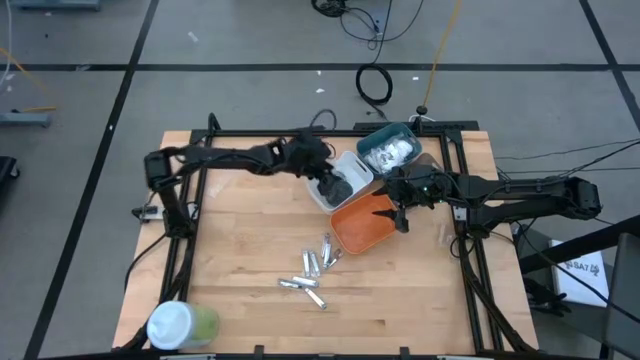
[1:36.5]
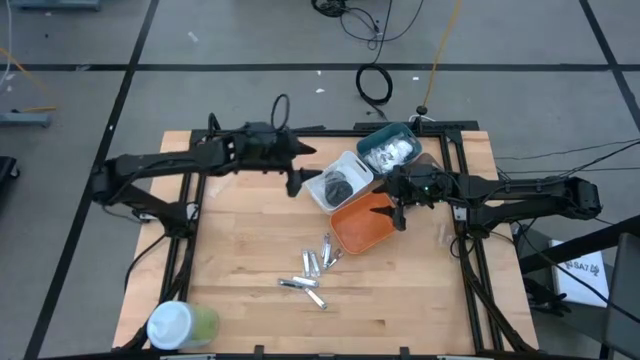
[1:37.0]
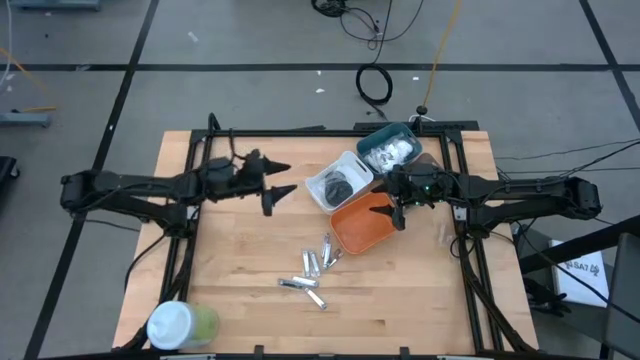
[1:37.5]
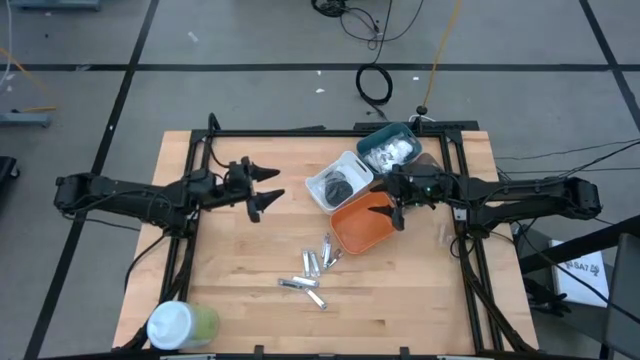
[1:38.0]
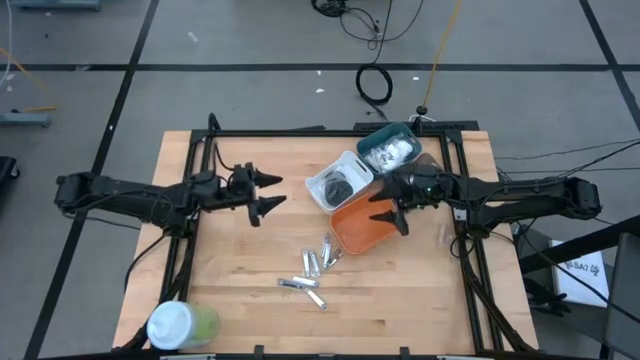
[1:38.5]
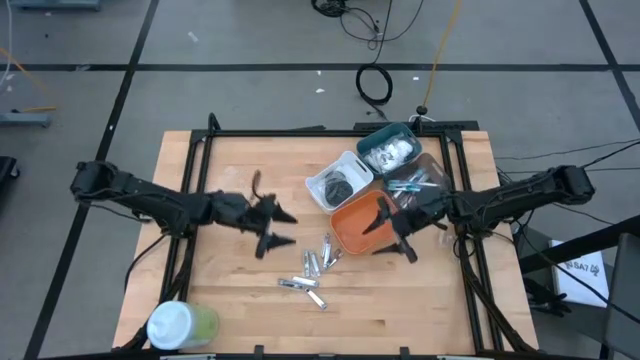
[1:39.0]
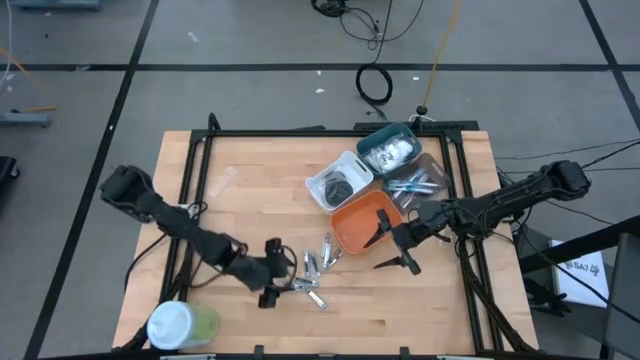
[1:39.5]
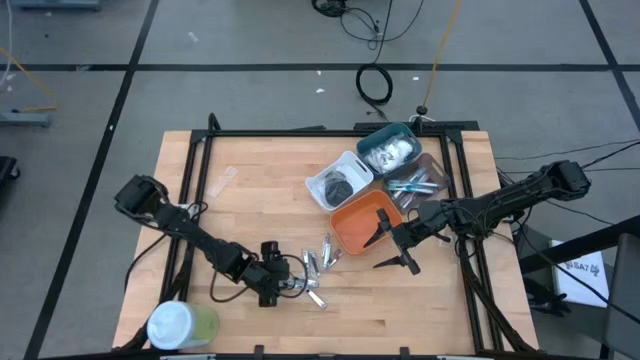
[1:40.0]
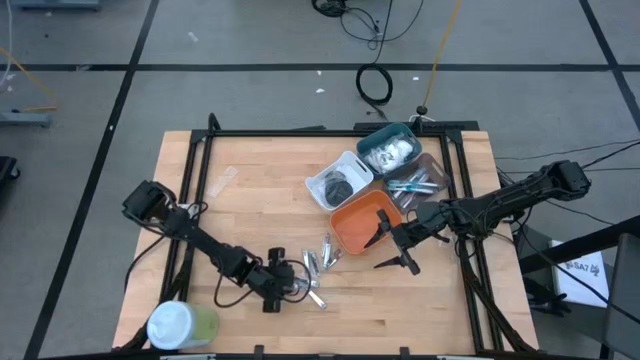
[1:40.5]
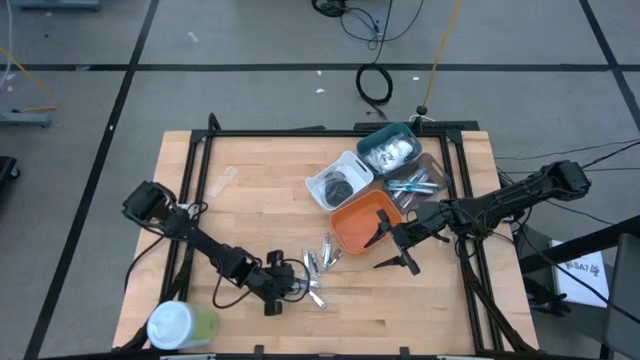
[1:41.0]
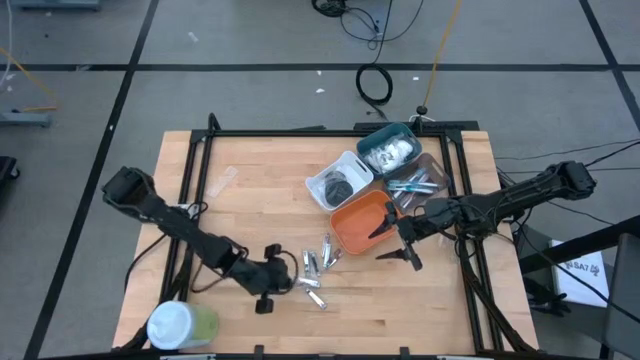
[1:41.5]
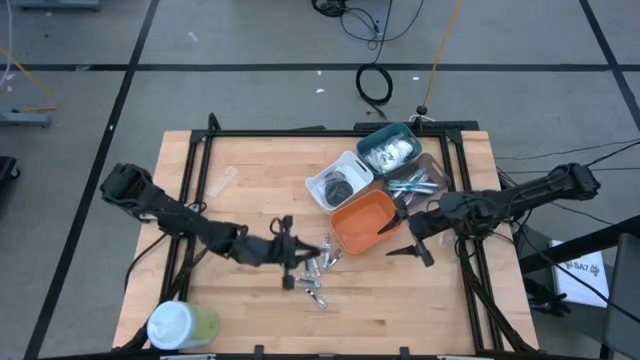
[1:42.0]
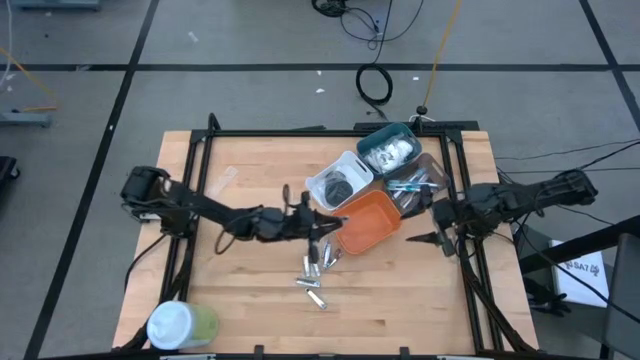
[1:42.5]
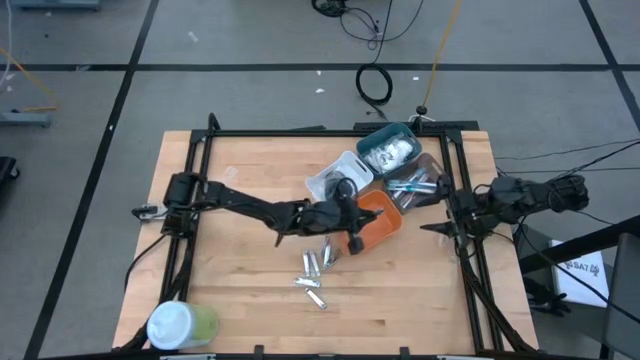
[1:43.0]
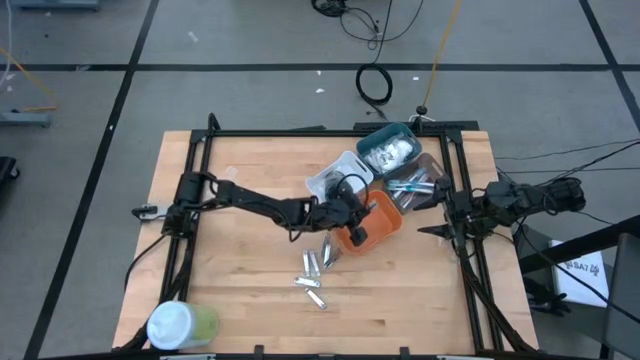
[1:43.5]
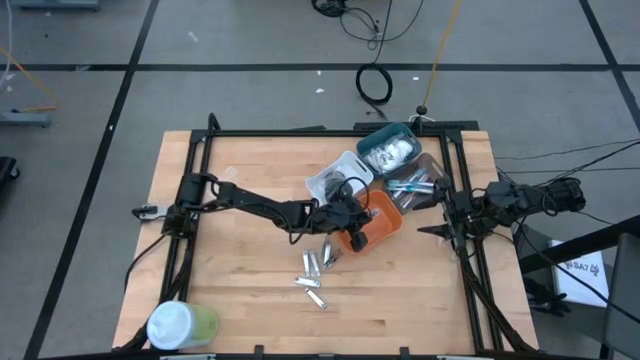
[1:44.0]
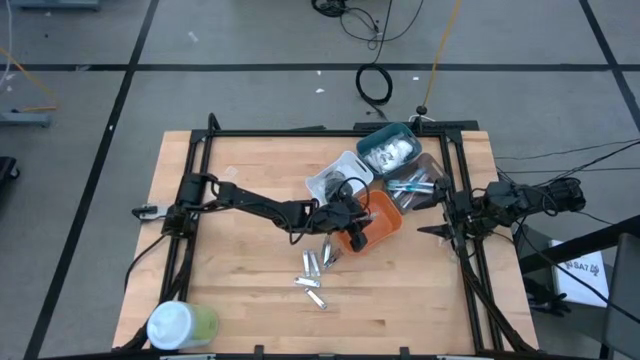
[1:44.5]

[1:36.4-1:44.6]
Task: Pick & Place Travel size toiletries
Put the silver nail cutter into the orange bin

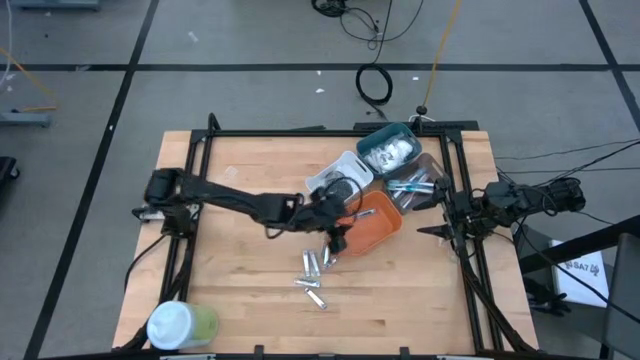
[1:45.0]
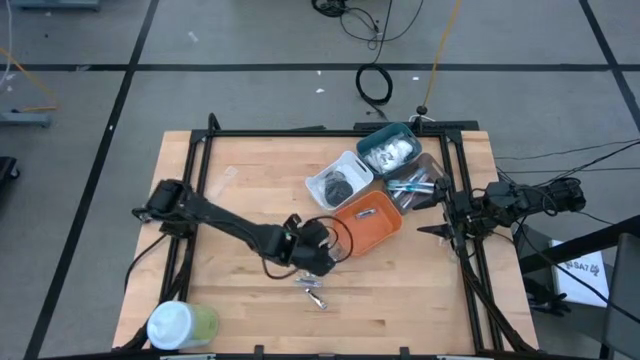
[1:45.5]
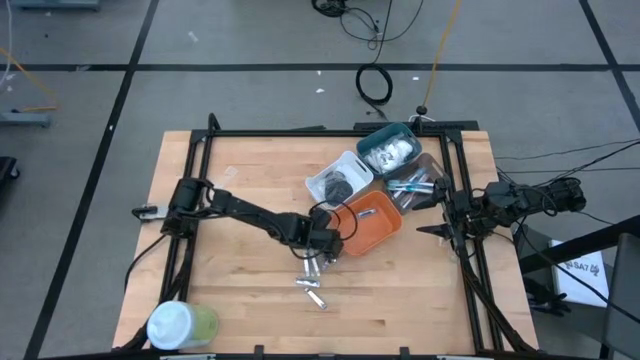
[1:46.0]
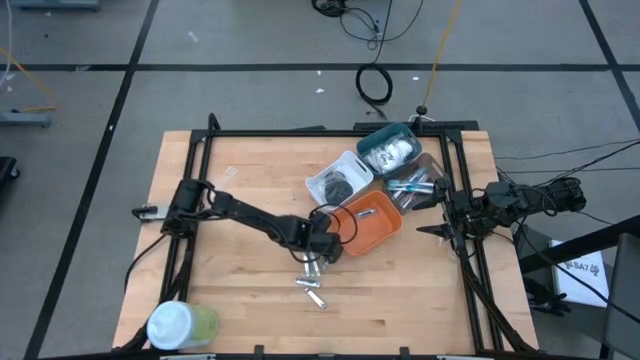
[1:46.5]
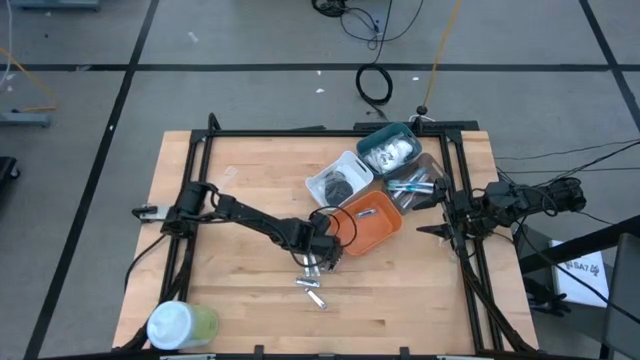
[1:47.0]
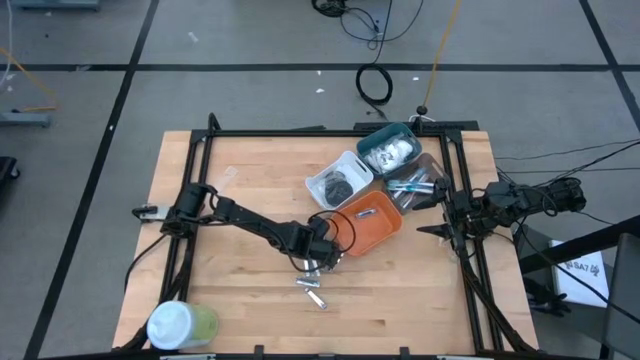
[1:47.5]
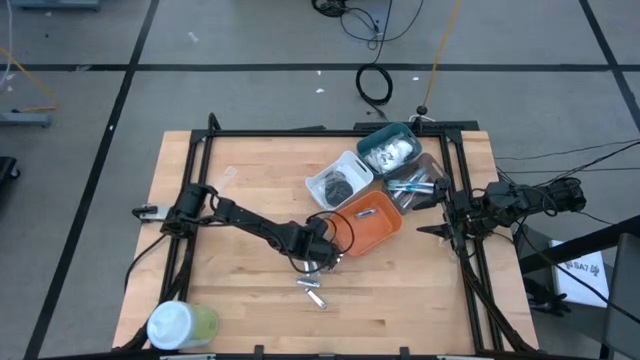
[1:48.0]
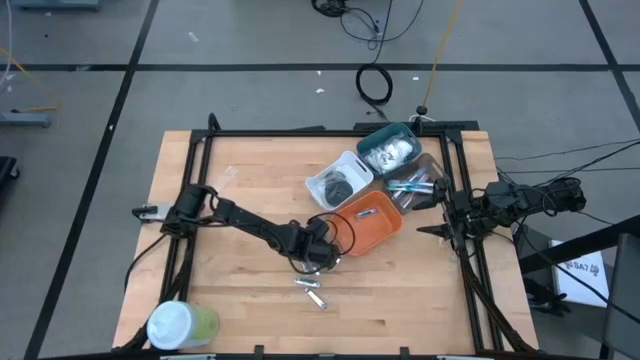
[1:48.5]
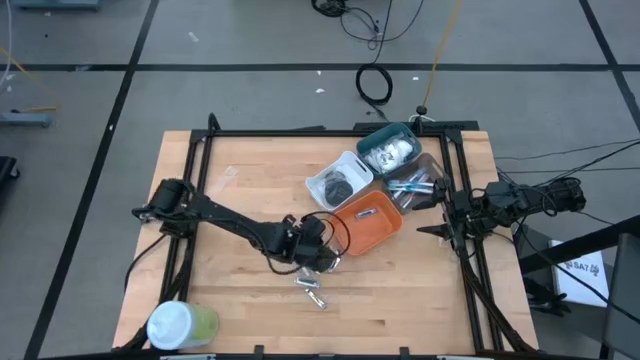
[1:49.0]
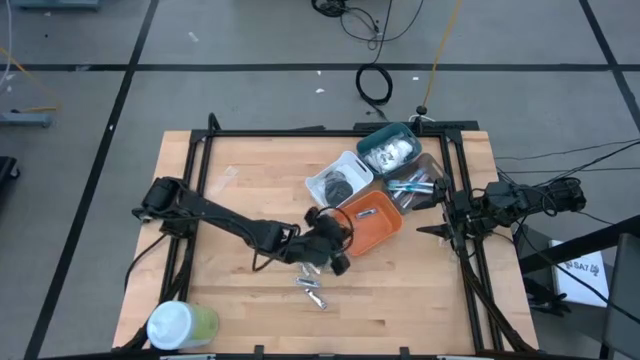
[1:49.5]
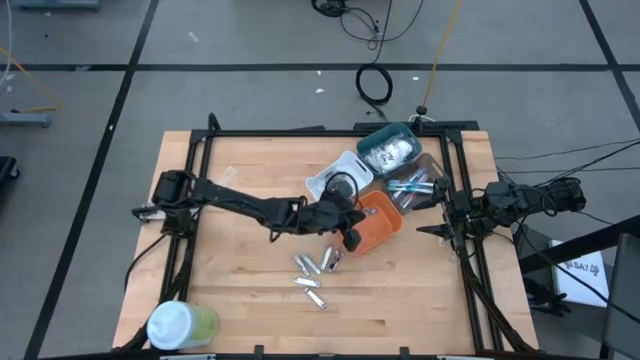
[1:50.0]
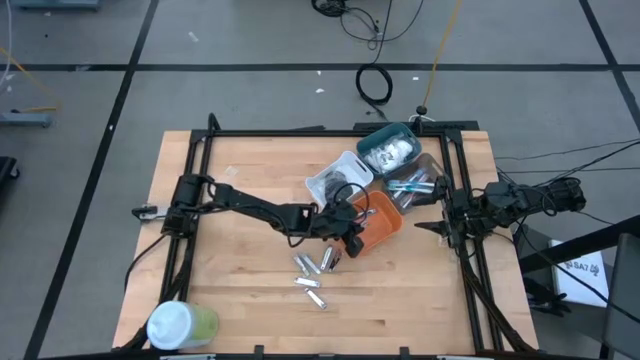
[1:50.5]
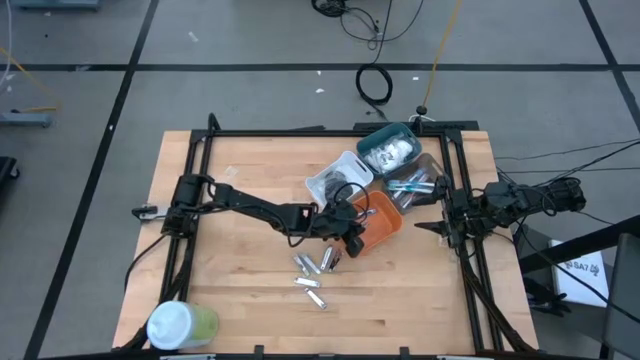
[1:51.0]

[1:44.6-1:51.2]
Put the silver nail cutter into the orange bin

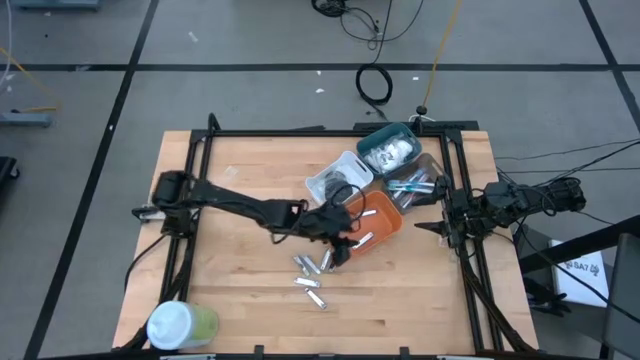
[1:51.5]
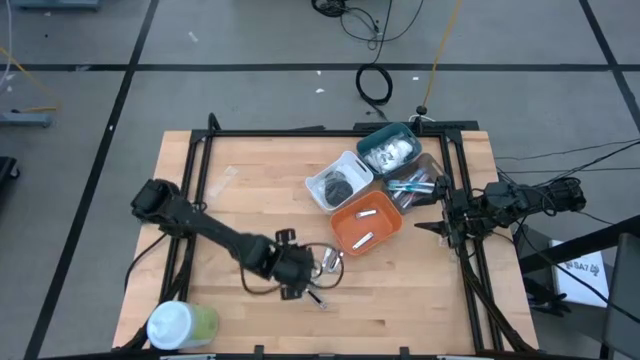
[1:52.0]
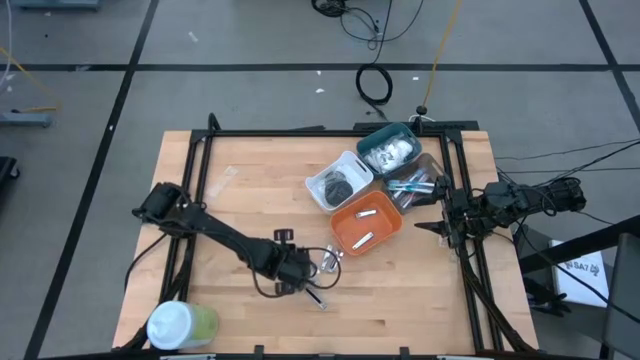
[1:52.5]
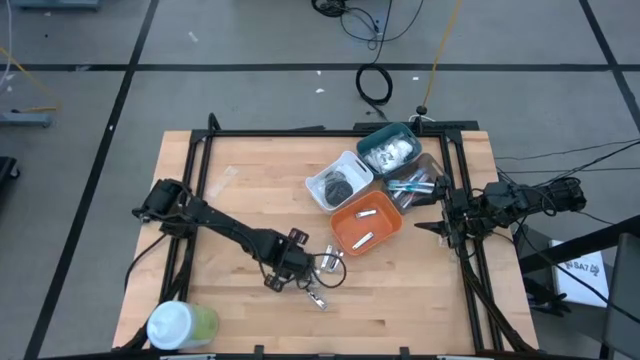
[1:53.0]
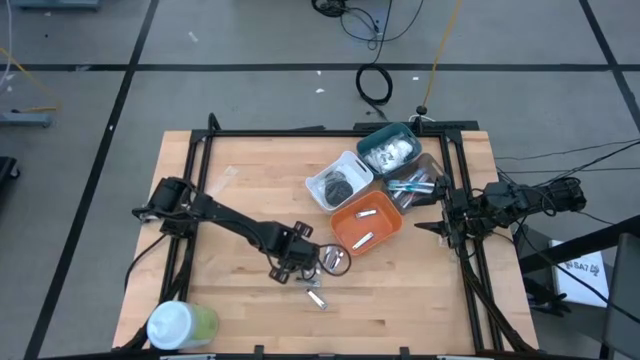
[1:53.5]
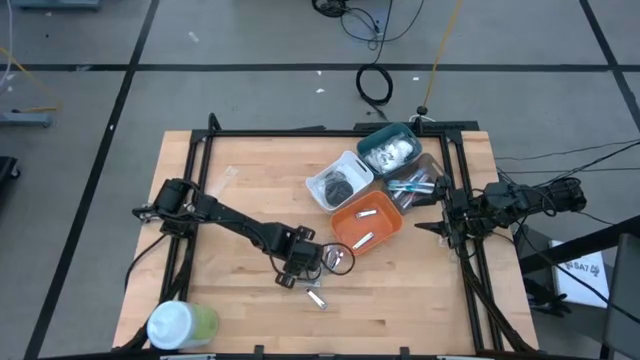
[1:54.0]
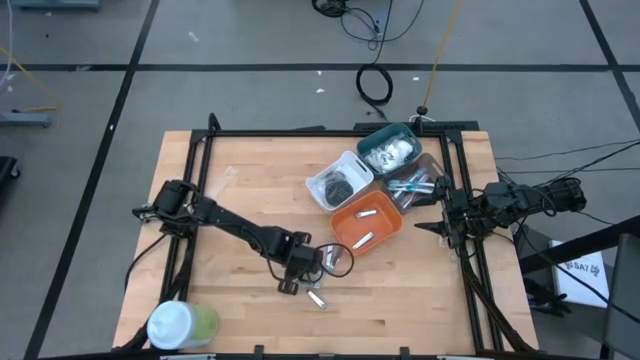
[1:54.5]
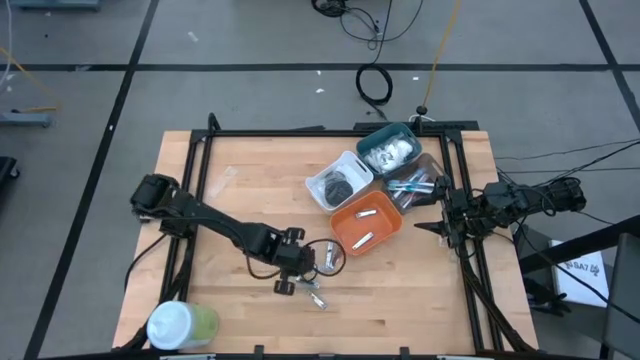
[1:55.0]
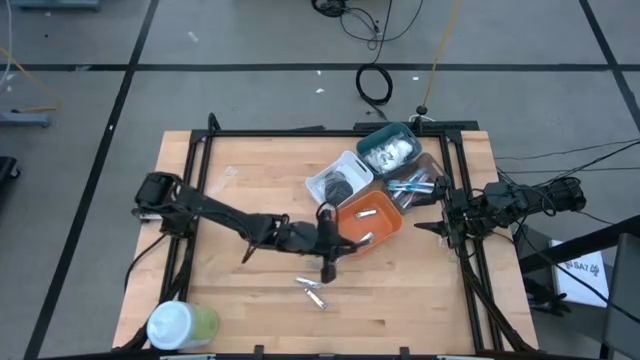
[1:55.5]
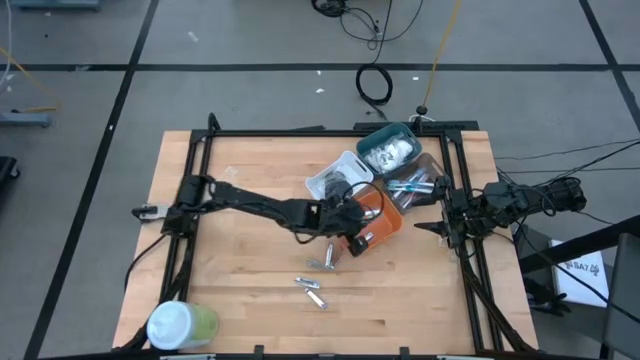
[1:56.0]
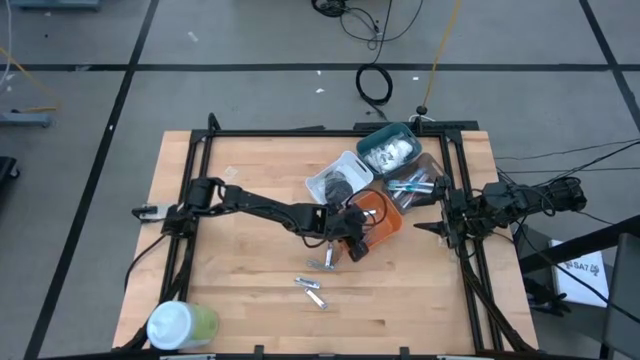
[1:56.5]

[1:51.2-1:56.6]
Put the silver nail cutter into the orange bin

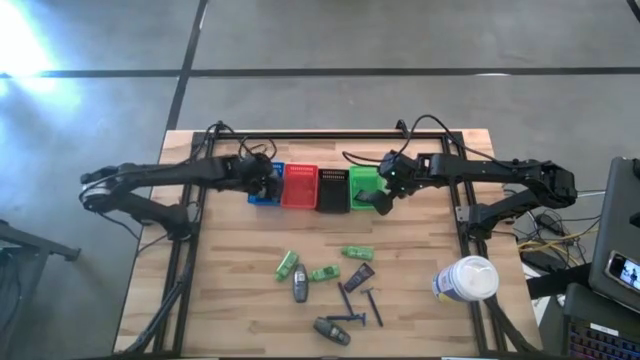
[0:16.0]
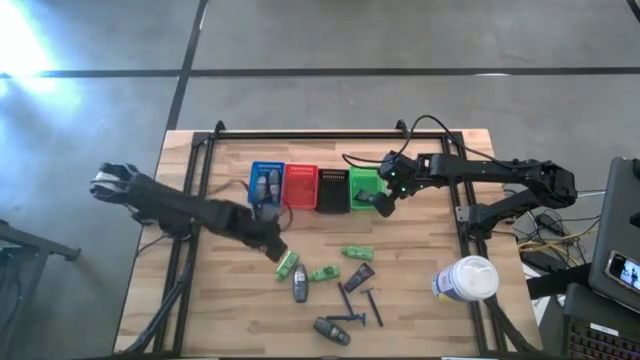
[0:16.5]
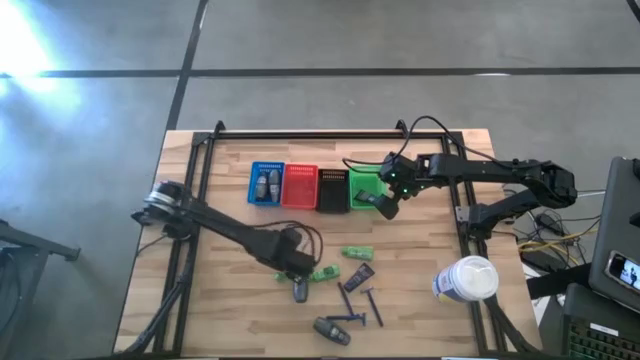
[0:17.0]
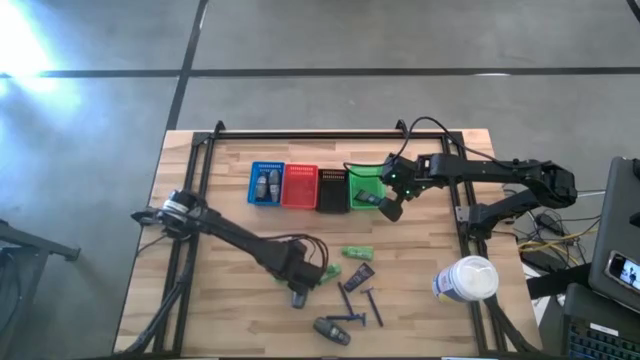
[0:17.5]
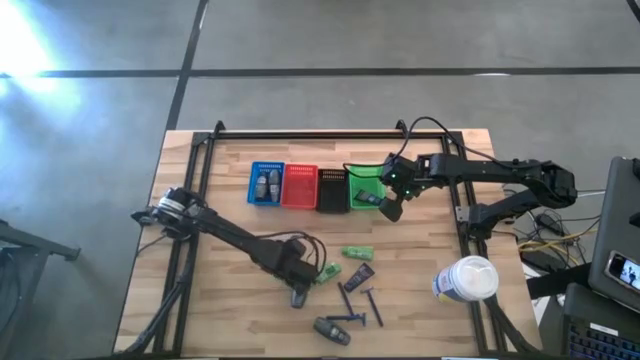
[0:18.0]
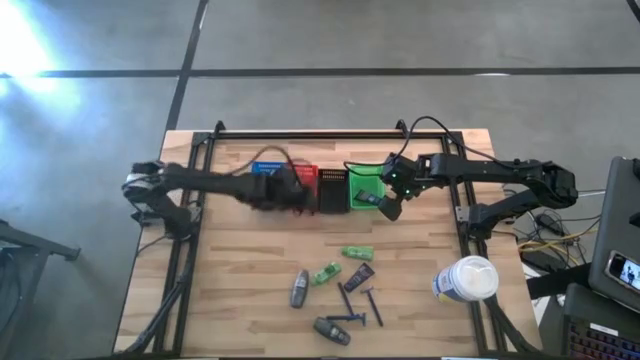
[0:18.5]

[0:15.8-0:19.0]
Task: Pick & Place Travel size toiletries
Put the left shampoo bottle into the red basket
